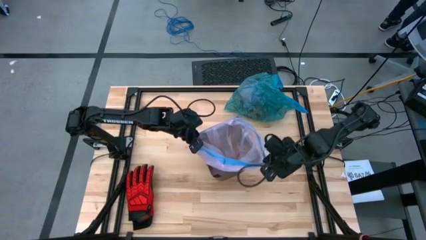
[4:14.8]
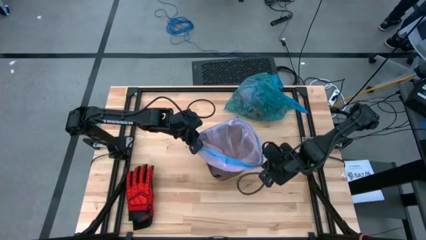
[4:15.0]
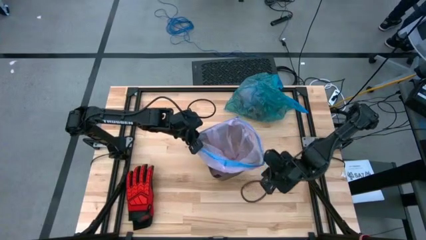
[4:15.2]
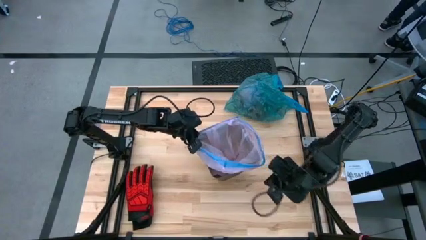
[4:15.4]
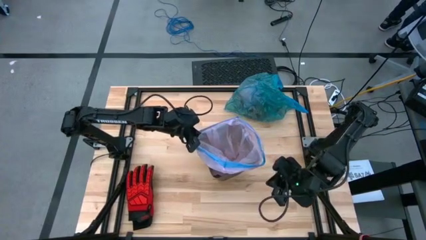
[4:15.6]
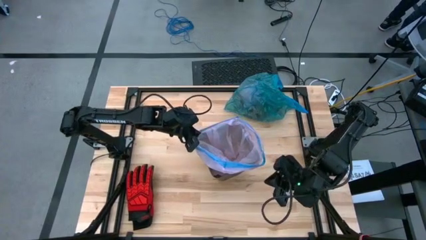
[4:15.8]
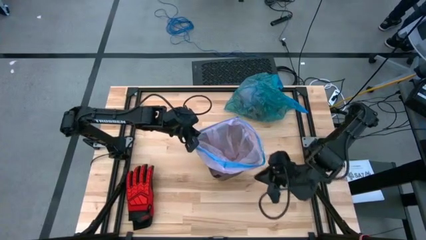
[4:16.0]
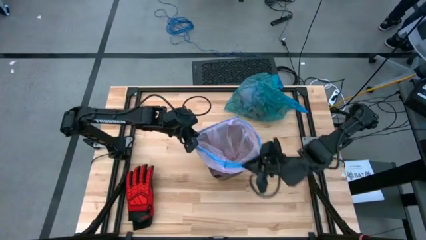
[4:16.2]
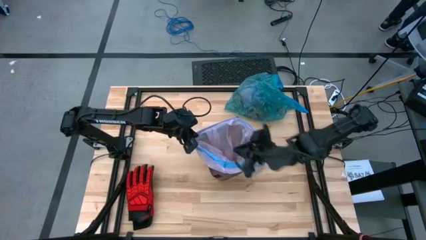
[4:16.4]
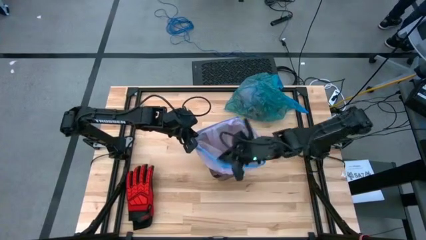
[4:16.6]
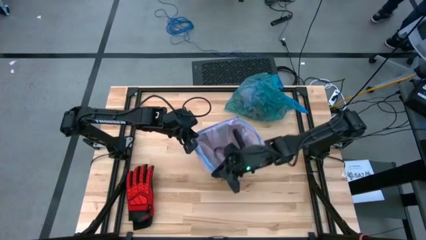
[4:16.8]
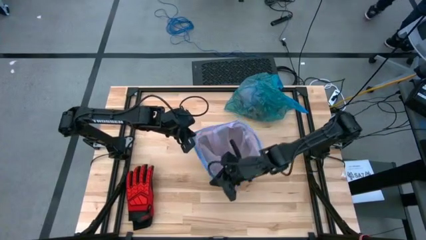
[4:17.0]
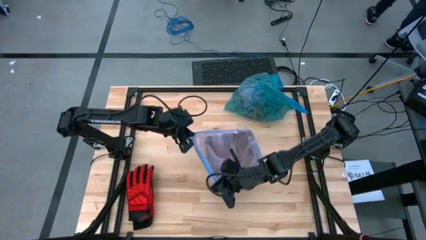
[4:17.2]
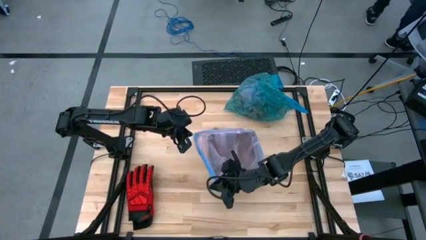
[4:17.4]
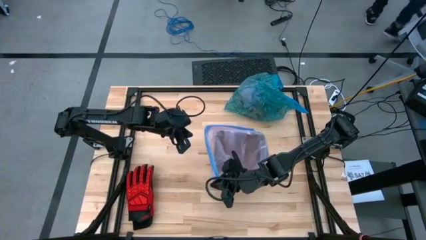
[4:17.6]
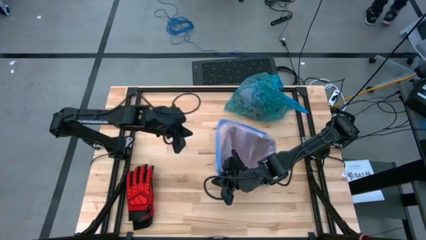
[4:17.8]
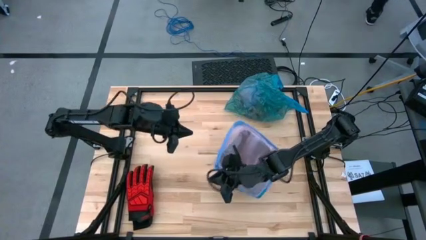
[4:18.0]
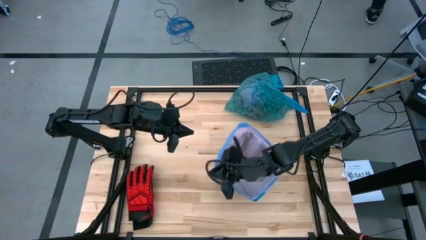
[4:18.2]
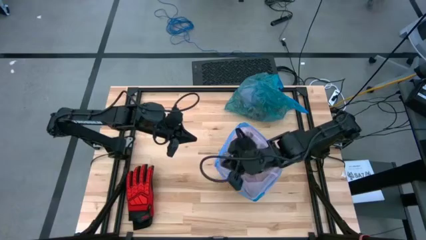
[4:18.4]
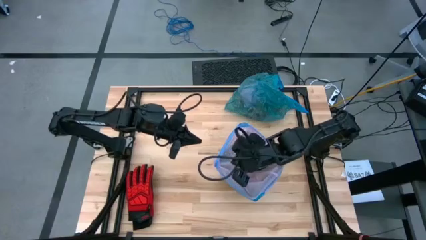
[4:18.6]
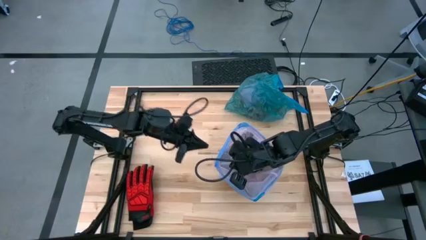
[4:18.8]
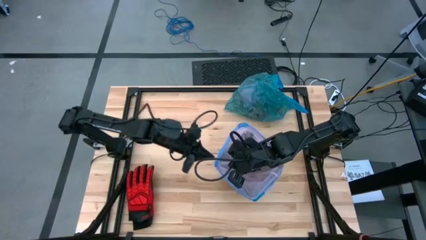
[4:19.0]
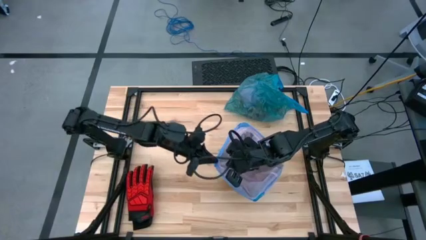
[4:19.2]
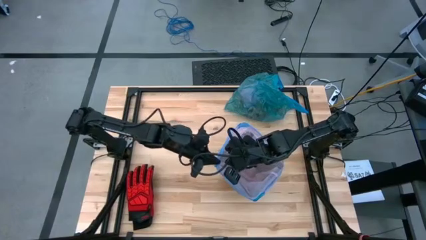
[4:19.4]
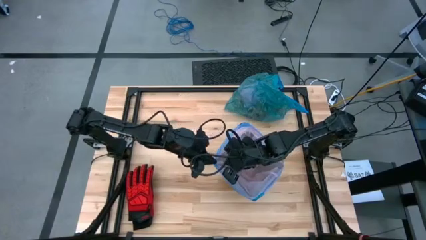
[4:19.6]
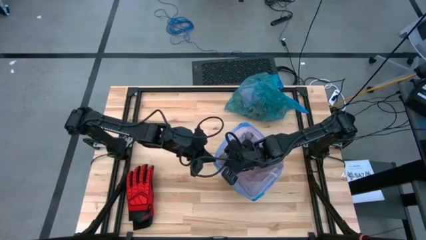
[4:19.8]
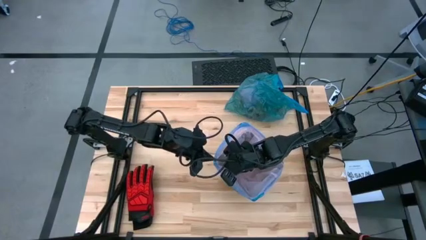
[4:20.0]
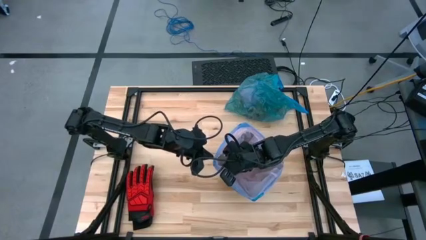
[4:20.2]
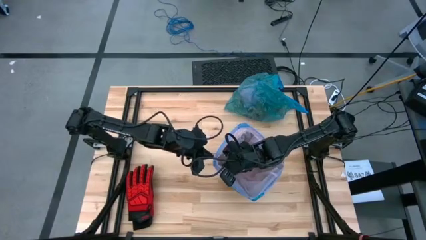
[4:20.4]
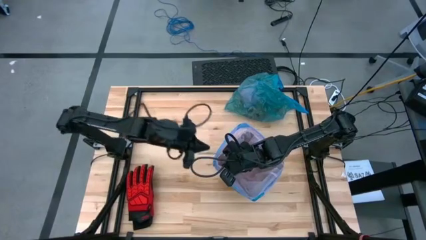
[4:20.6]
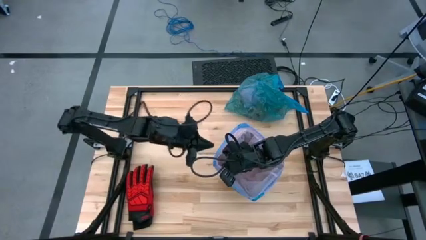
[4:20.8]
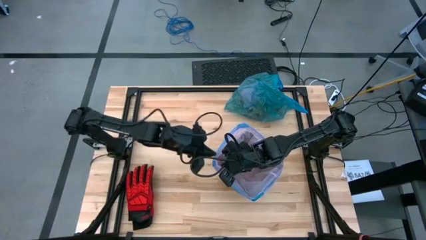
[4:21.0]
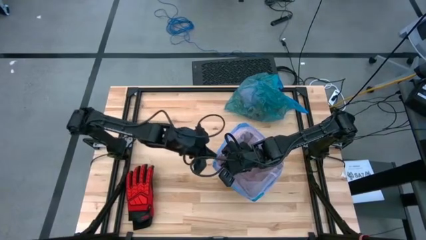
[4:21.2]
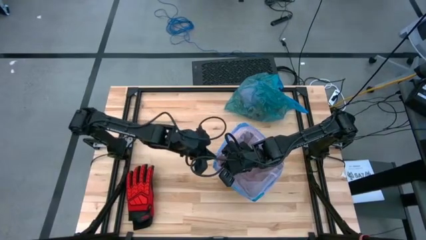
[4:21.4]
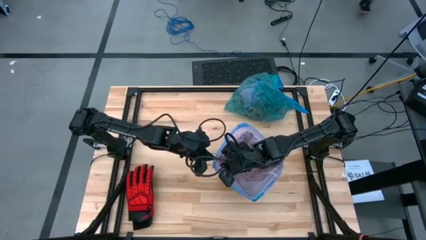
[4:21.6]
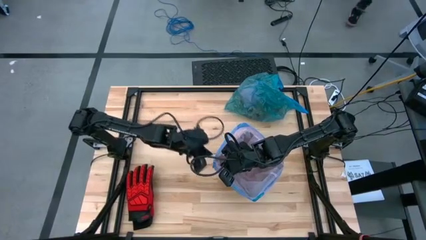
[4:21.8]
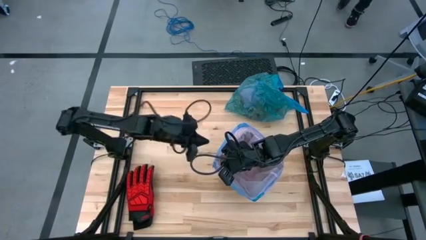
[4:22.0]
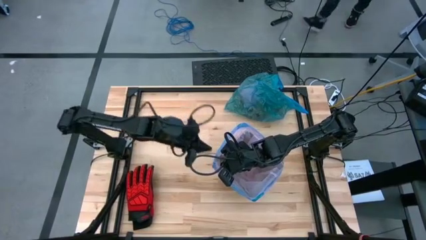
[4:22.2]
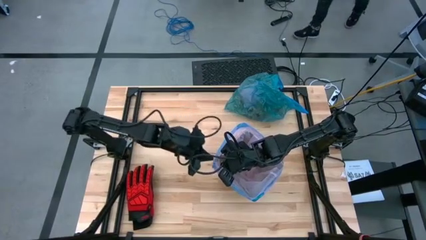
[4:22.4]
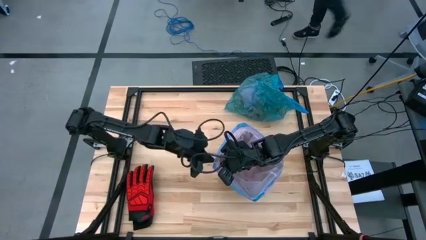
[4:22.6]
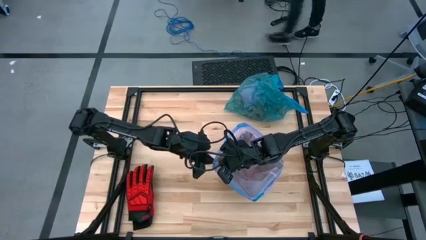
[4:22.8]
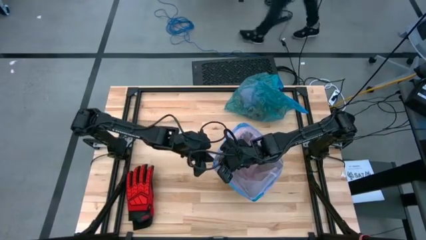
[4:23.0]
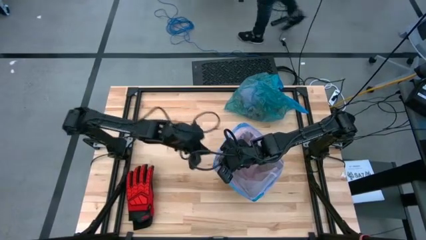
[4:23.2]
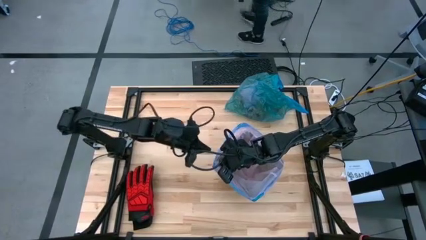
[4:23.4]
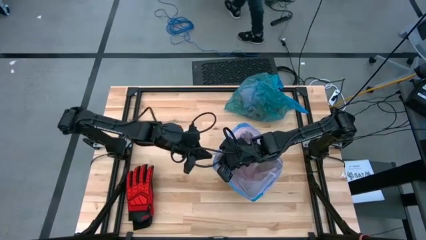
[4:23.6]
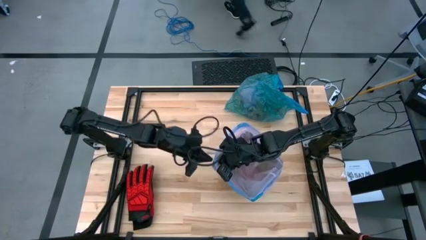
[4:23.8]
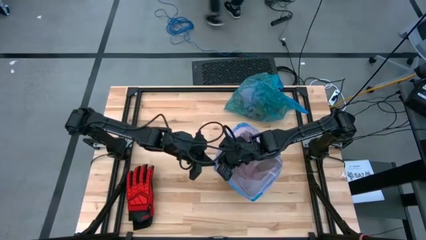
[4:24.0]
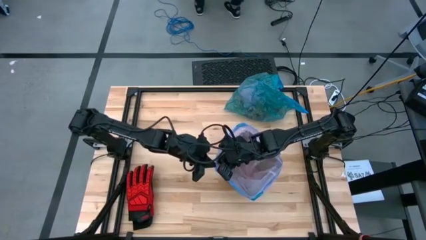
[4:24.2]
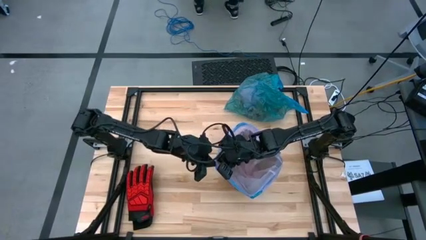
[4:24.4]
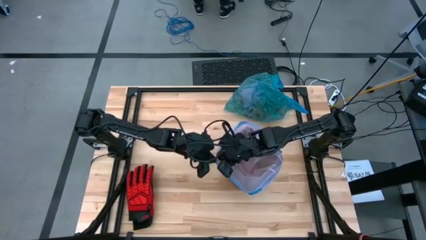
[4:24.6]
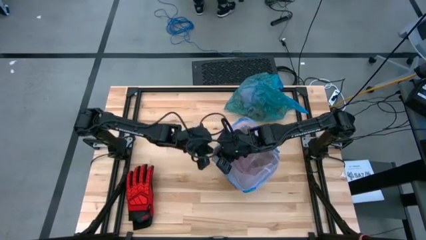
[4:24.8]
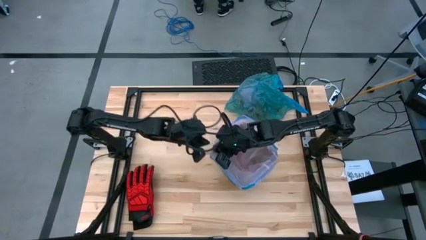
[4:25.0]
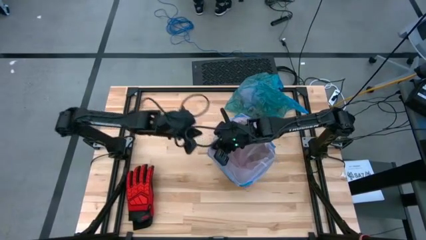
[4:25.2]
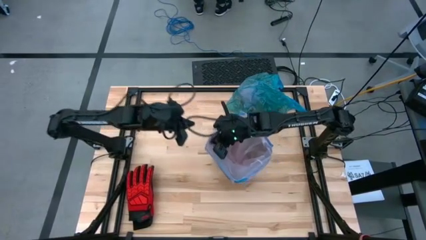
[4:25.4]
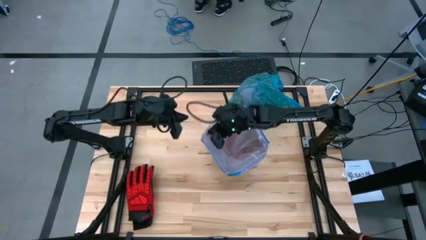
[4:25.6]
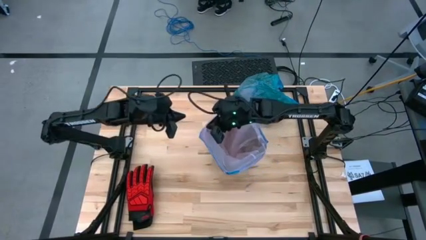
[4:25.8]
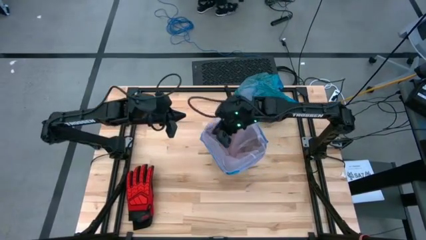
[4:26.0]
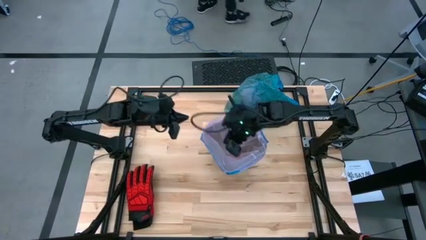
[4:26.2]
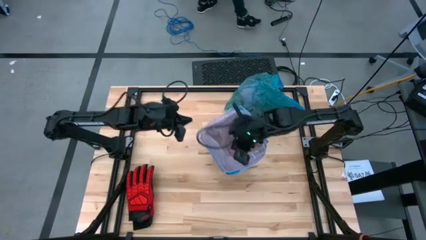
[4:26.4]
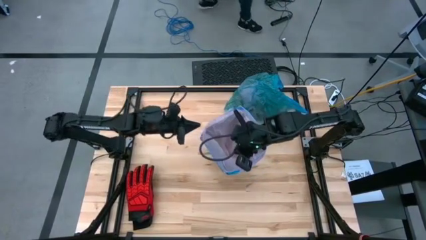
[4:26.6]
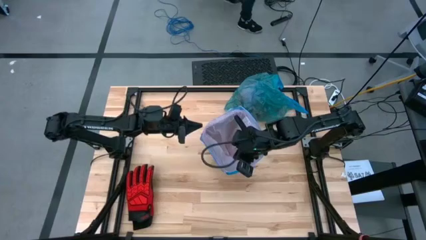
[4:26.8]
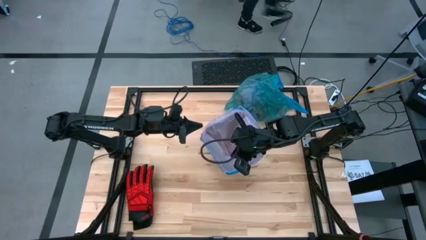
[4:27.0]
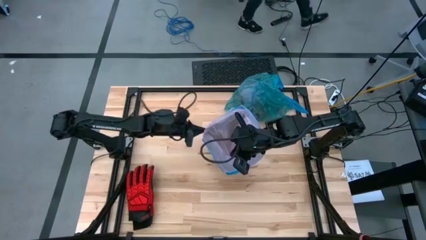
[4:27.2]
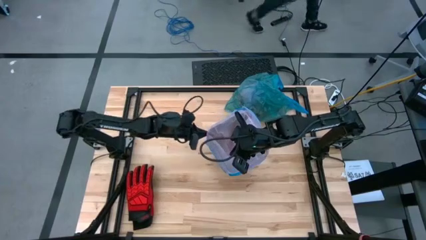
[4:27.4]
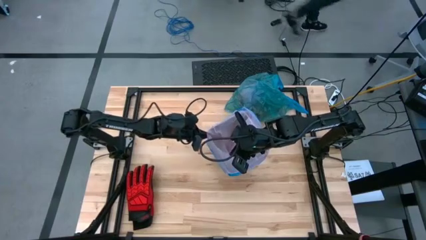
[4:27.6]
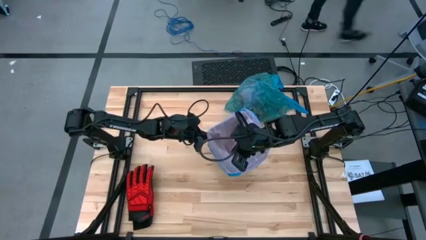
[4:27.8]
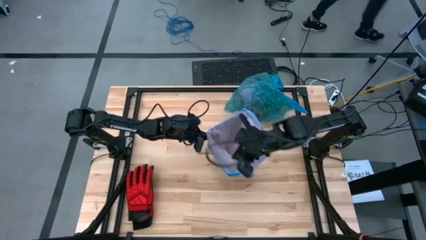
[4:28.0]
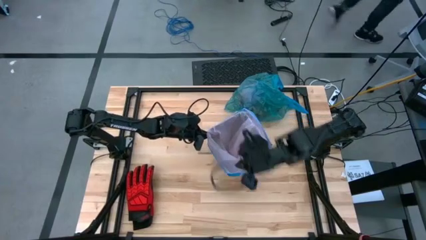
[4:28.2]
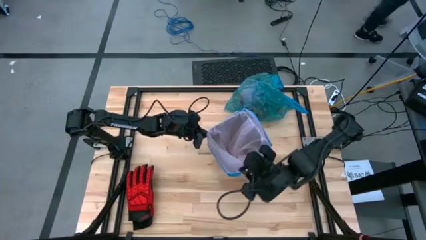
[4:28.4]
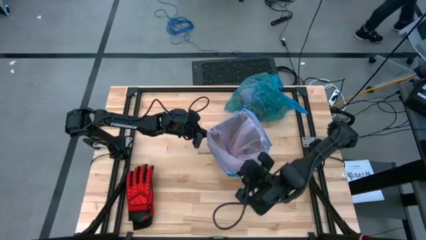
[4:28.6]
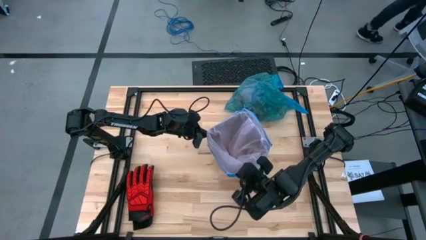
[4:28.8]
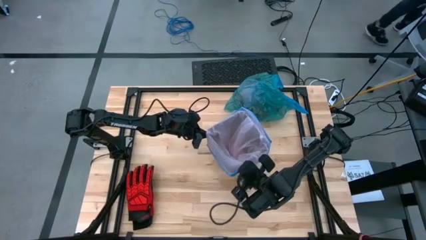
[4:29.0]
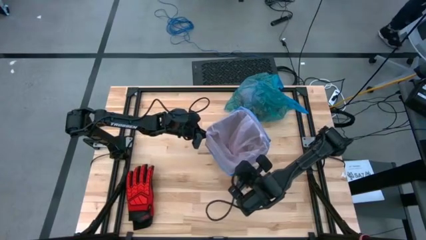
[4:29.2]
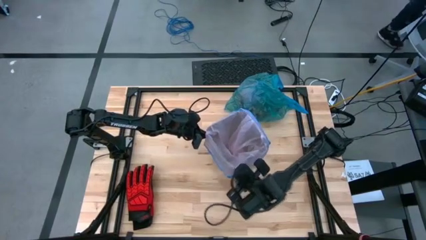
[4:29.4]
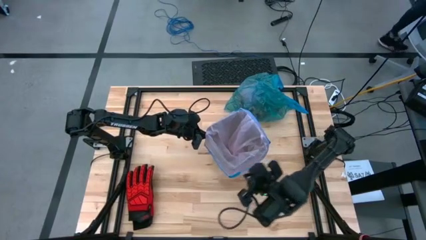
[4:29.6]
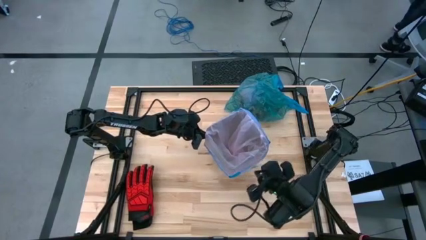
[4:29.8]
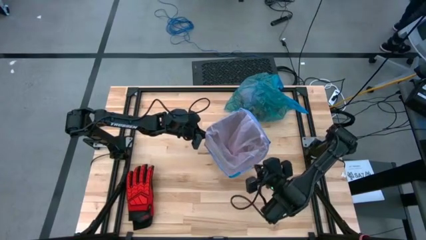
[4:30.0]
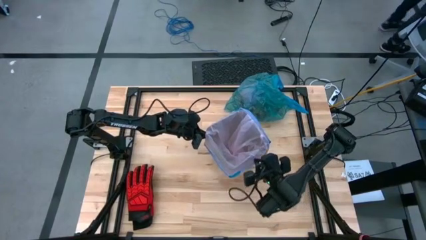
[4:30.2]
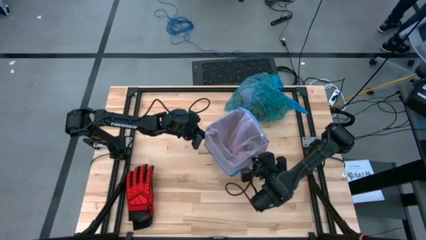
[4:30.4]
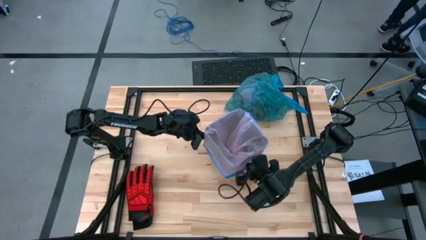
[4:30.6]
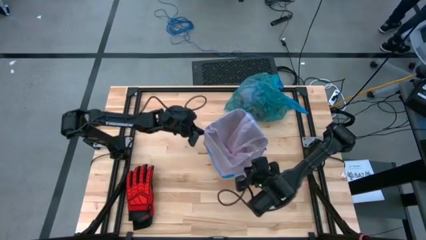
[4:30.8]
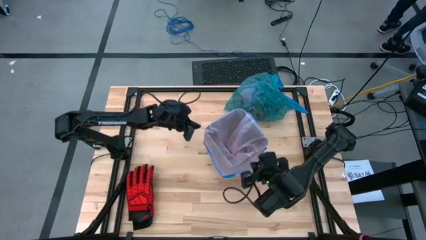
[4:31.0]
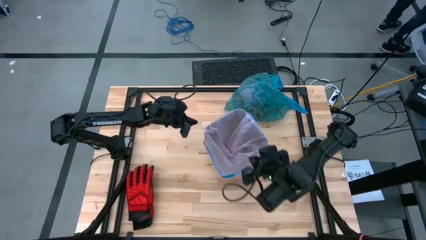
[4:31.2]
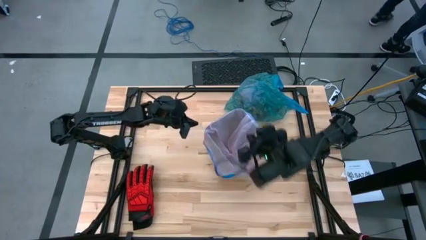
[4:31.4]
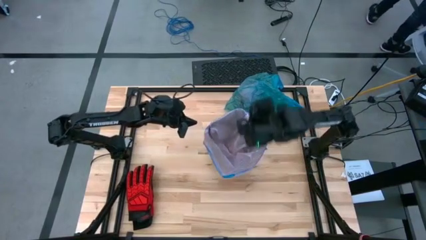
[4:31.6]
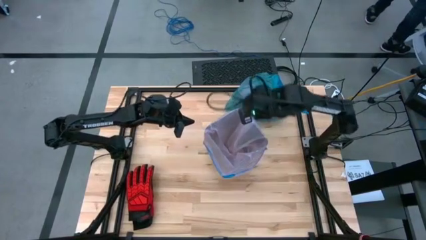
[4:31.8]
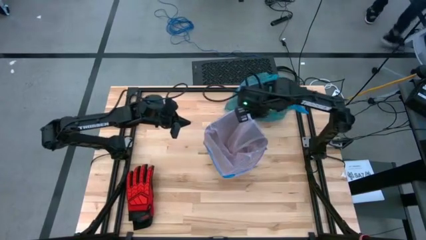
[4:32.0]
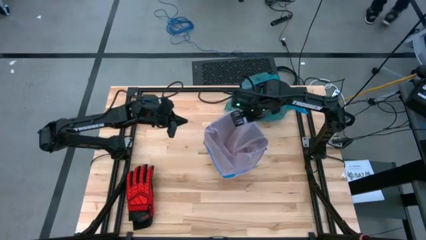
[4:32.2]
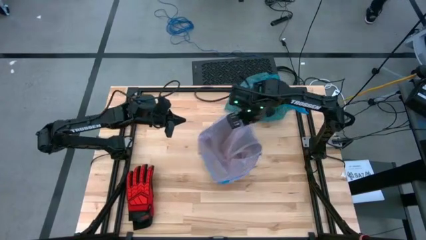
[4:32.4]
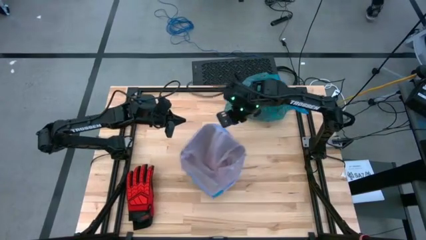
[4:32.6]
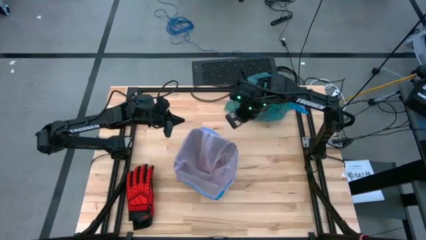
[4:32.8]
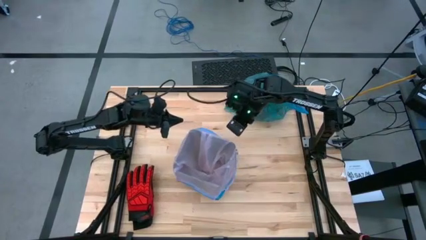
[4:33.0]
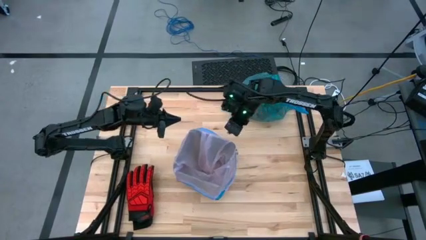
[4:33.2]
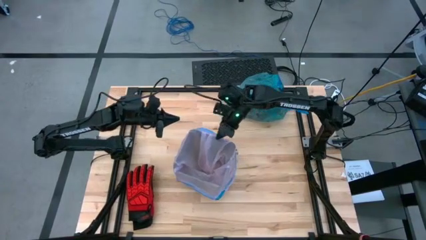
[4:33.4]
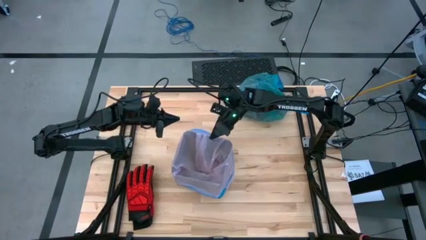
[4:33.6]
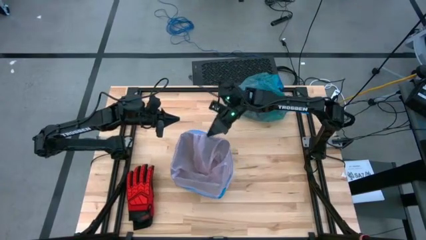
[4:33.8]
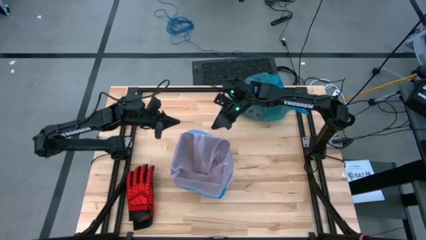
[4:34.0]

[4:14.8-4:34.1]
Task: place trash/remove bag and relplace
Put the pink trash bag into the trash bin
